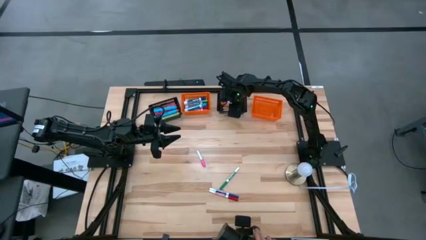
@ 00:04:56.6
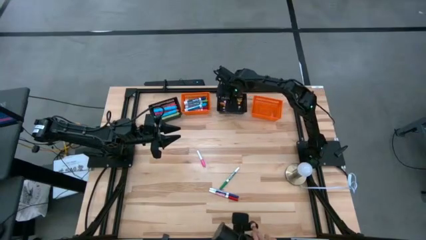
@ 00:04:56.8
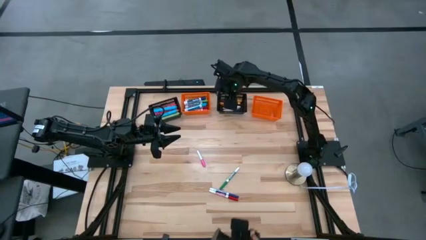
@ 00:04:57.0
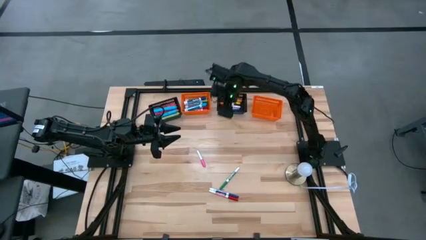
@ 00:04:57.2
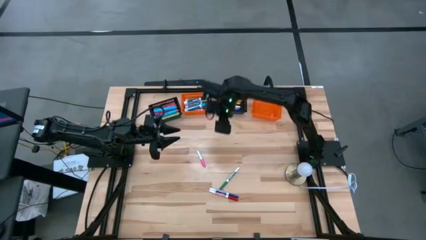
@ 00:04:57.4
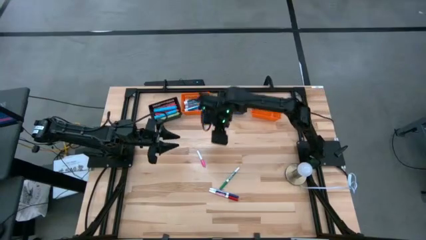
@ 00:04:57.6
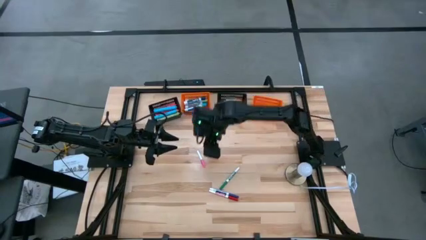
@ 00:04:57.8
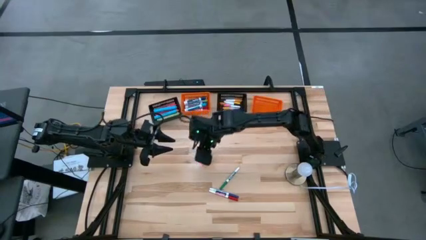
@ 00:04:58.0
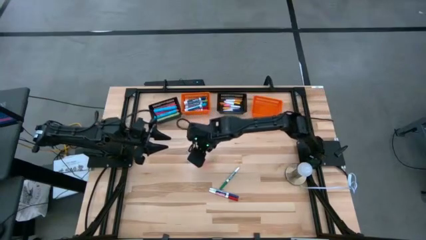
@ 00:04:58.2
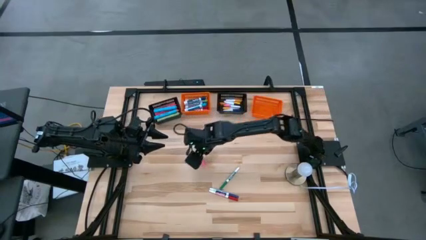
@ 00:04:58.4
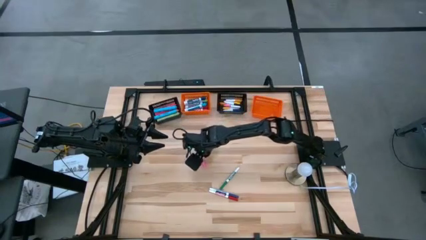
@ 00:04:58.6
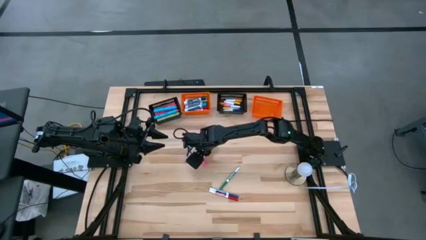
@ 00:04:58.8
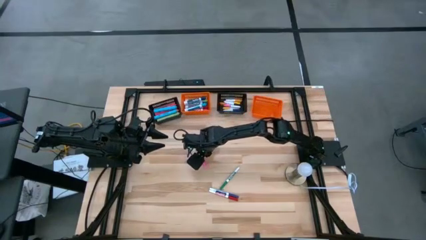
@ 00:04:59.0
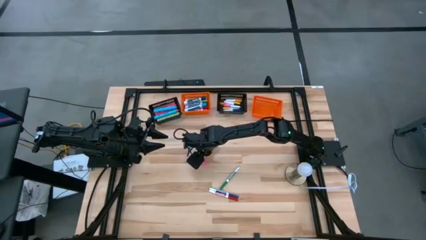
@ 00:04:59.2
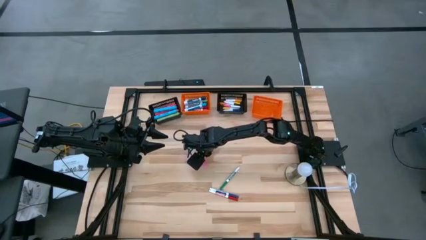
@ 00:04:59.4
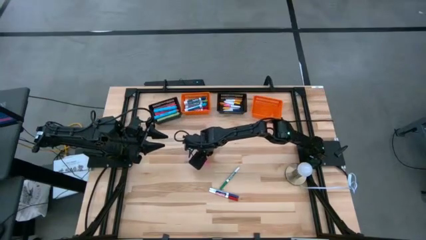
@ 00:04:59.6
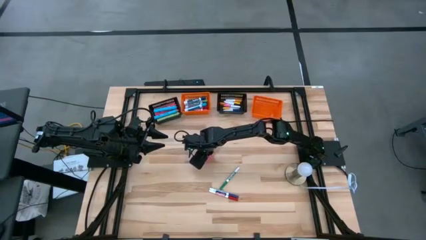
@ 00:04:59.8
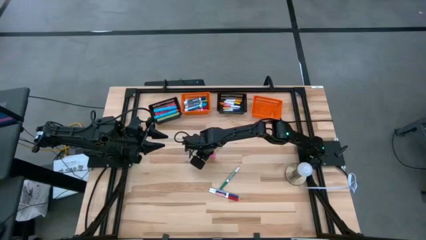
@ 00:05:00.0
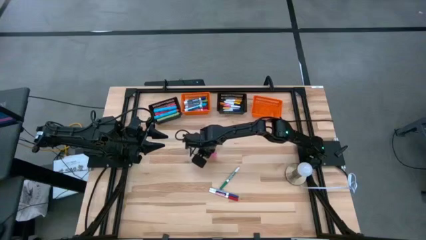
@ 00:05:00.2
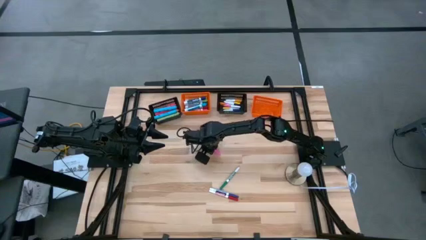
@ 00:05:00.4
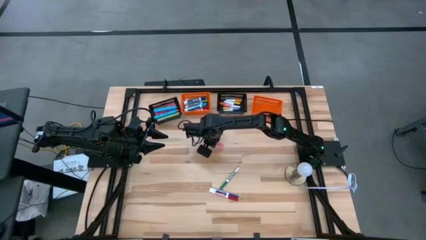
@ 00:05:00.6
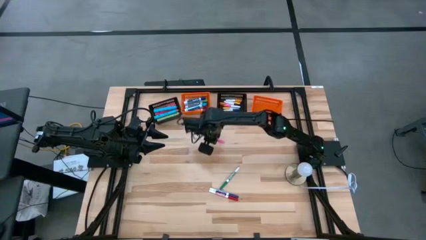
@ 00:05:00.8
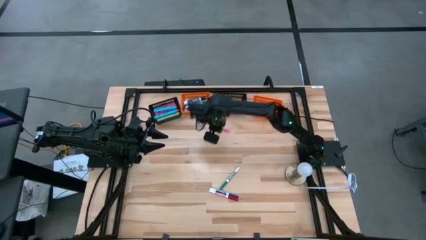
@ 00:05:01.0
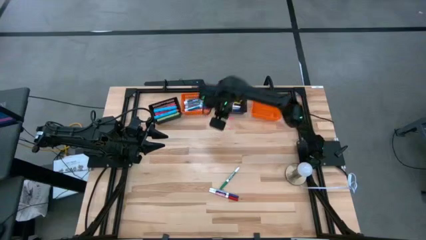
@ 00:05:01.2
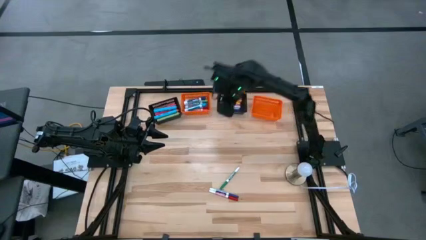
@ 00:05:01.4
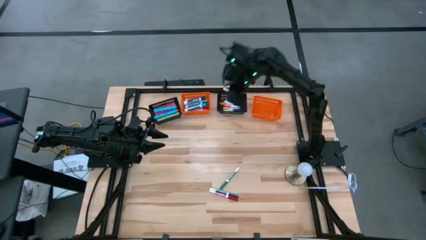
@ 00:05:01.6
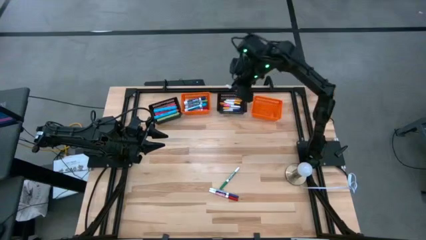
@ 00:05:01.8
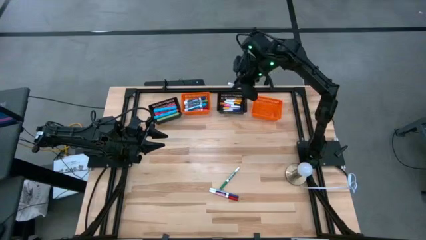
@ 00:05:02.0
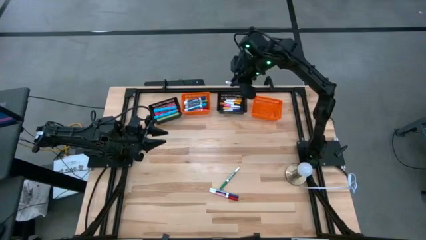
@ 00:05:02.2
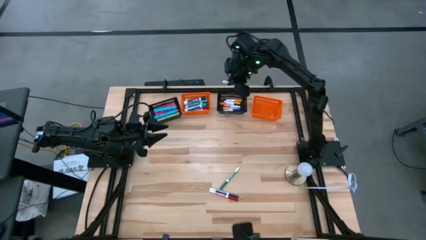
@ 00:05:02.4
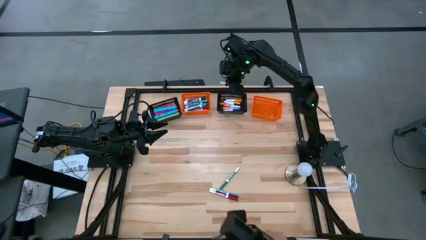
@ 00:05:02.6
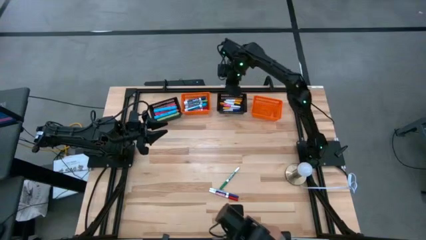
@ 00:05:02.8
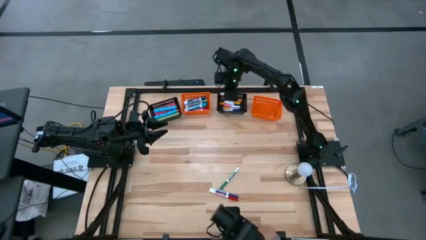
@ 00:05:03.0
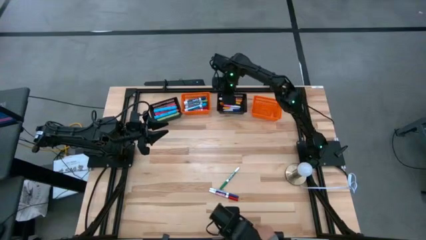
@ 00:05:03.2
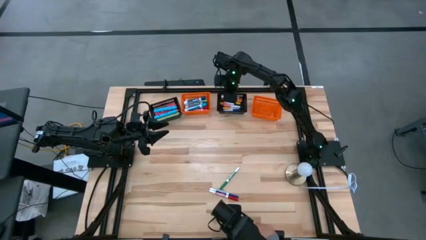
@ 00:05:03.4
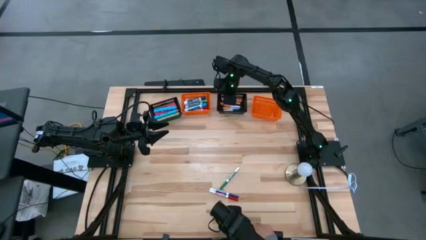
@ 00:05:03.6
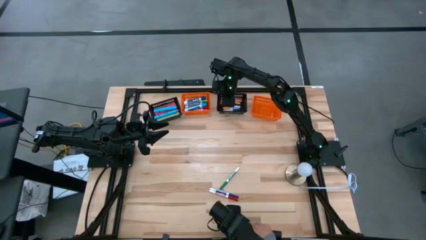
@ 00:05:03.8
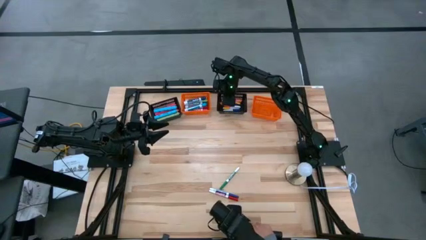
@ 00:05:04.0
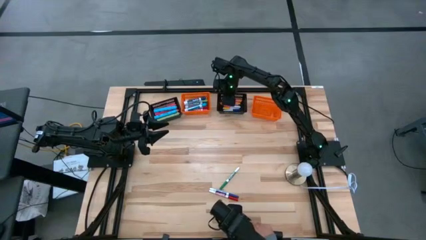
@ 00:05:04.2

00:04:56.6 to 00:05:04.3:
Task: Pick & Place Markers
Put the pink mini highlighter pen into the black bin

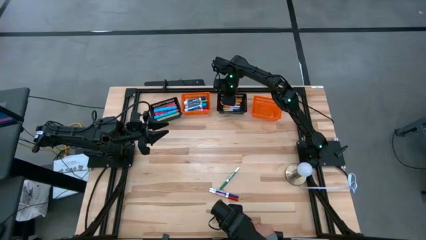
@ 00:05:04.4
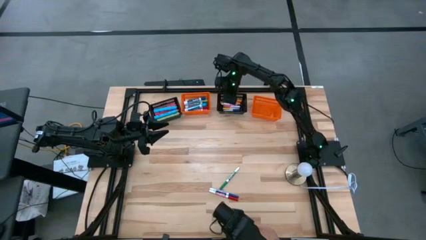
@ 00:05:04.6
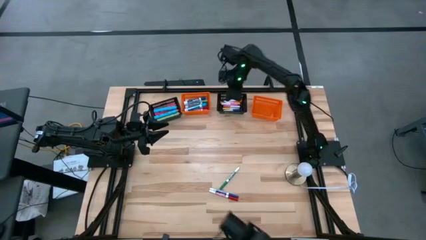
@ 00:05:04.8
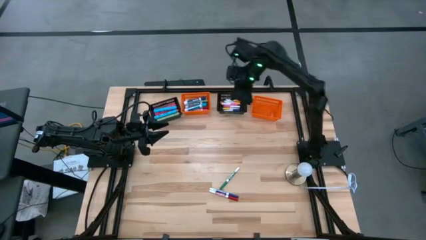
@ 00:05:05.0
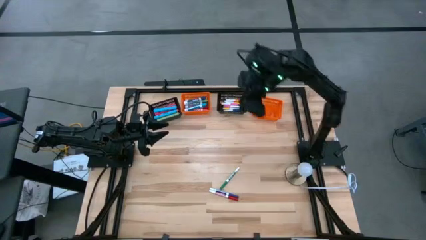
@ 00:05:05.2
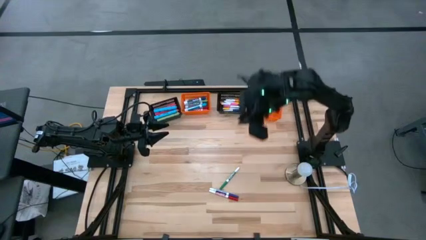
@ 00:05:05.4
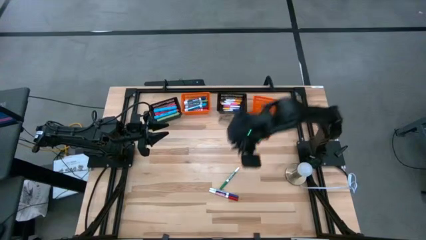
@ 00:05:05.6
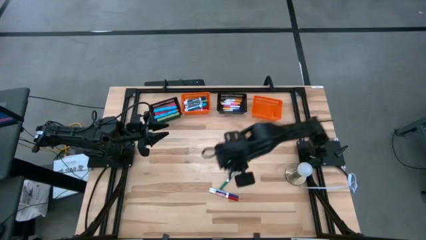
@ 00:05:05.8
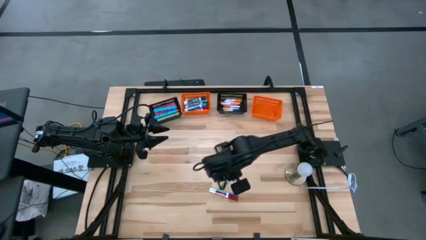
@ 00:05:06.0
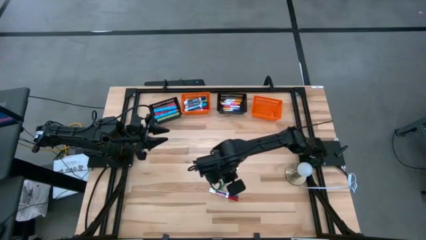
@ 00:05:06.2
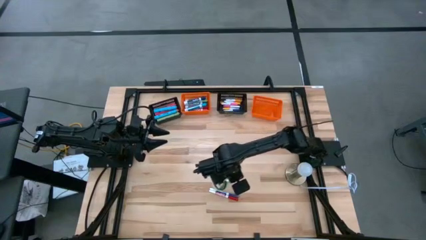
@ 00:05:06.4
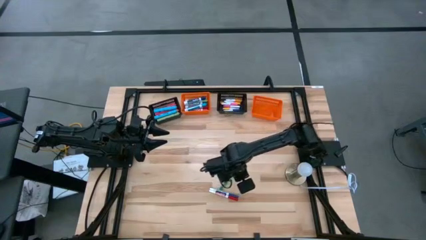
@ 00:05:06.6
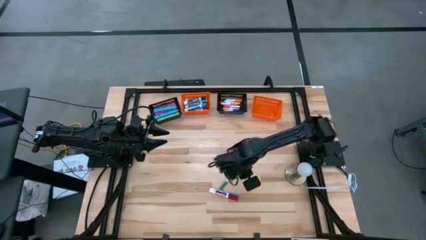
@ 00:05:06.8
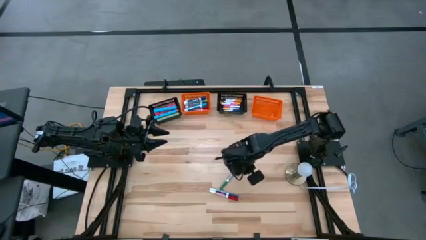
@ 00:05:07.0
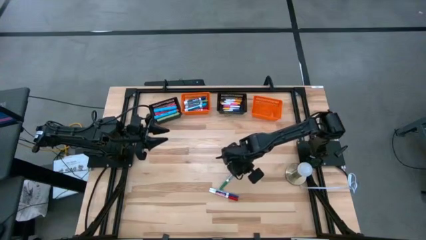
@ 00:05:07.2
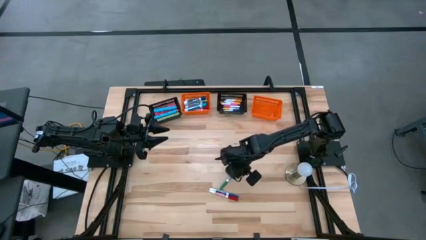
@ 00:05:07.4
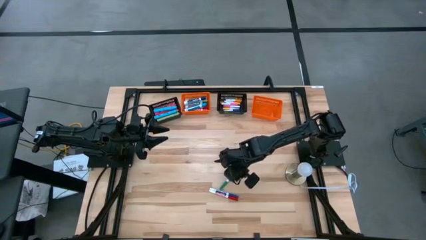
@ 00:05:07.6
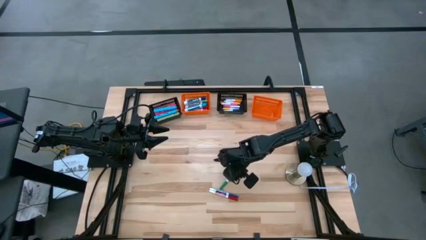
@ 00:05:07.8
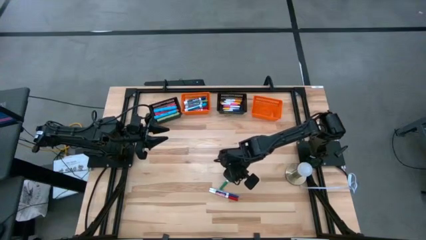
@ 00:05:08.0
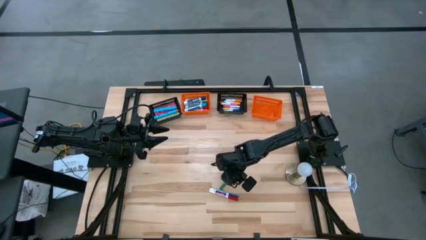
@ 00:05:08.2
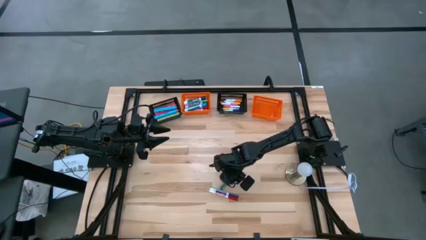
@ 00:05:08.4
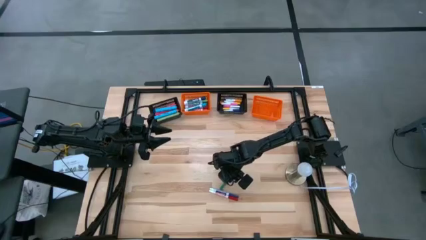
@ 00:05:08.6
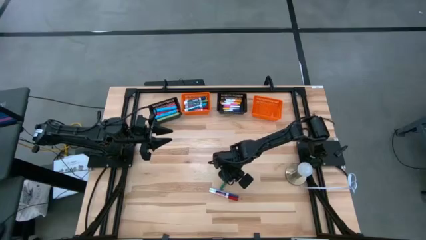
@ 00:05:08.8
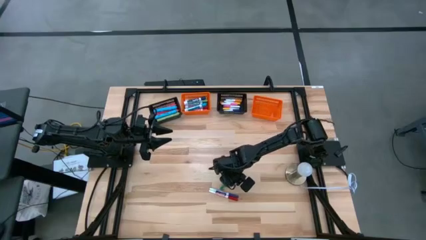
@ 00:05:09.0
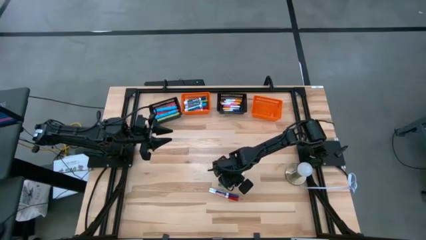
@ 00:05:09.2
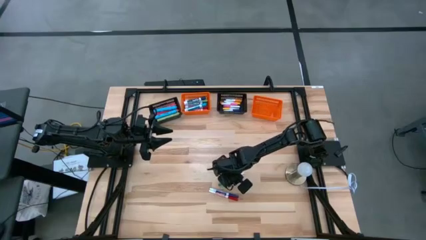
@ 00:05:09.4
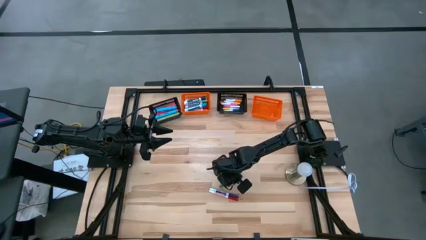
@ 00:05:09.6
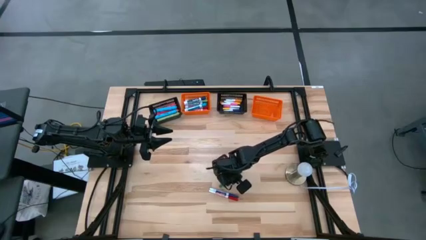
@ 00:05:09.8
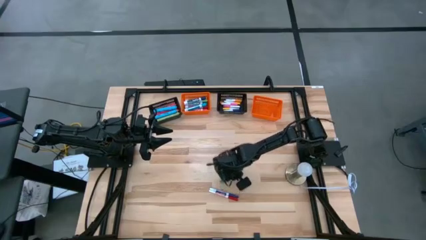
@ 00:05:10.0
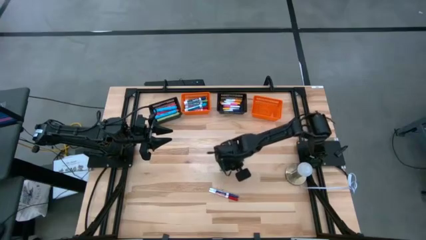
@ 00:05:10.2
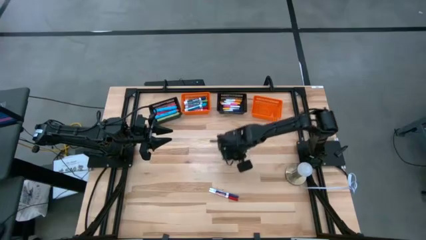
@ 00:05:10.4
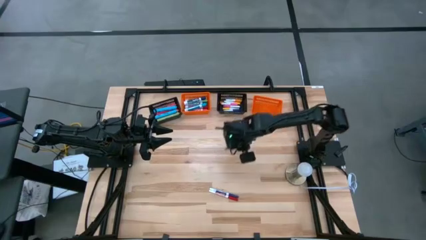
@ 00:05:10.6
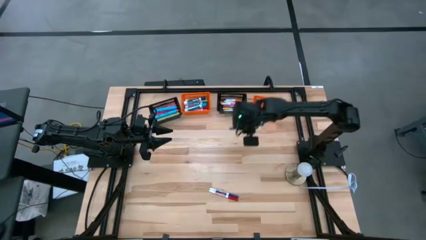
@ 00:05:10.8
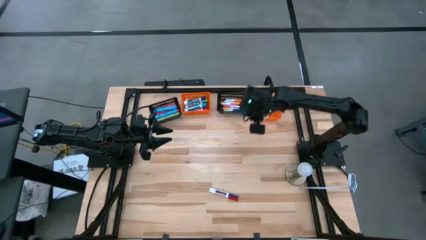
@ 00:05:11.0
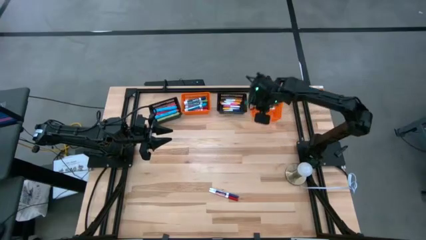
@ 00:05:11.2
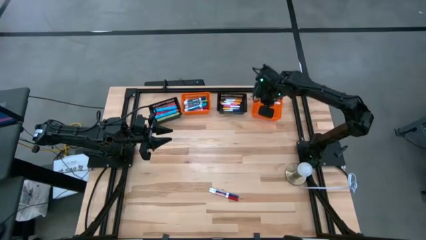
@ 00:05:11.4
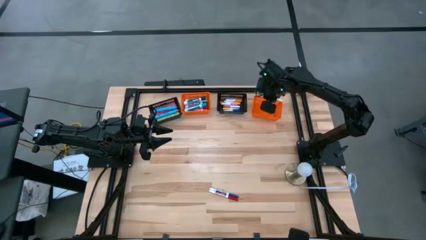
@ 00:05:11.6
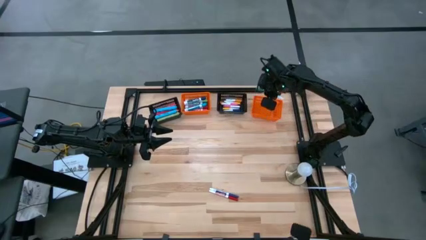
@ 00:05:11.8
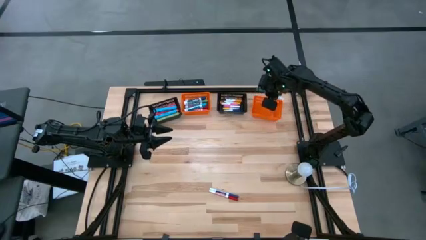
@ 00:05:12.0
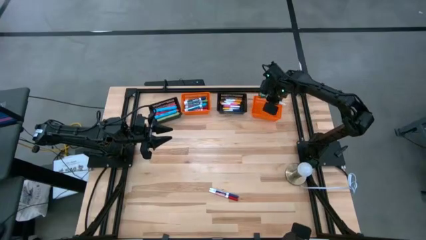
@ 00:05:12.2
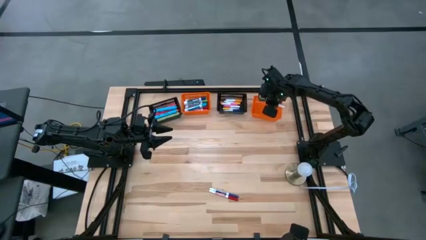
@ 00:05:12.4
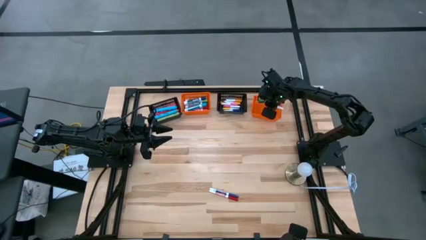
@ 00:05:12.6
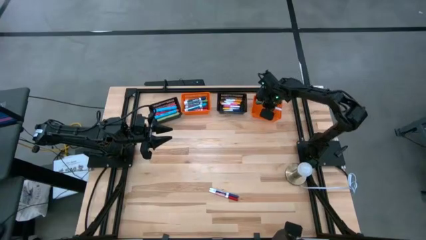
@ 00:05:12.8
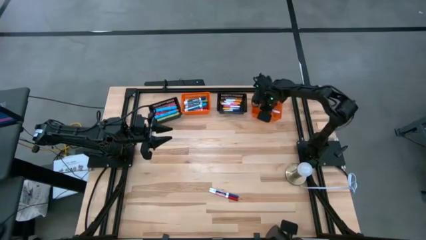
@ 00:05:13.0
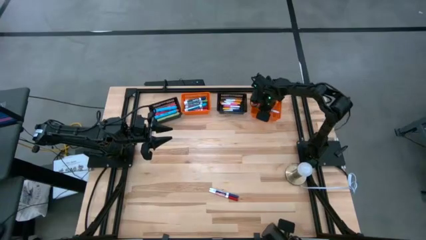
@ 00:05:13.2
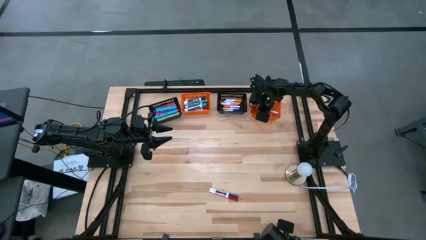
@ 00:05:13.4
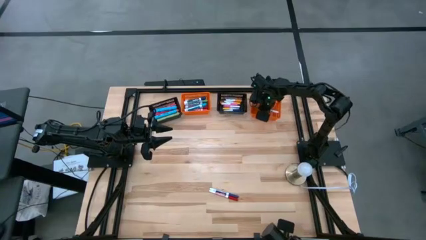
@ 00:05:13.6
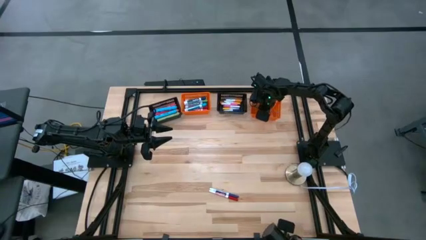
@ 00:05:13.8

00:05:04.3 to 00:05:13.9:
Put the thin green marker into the right orange bin
